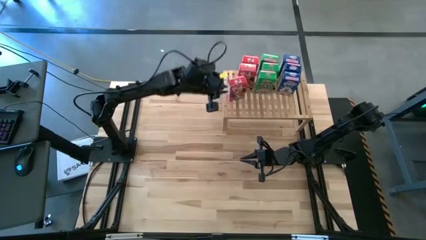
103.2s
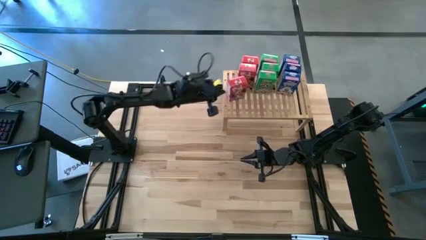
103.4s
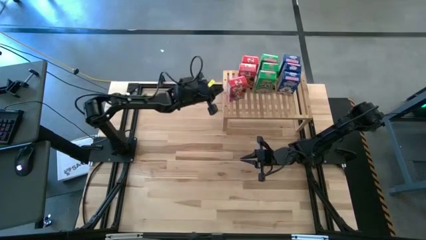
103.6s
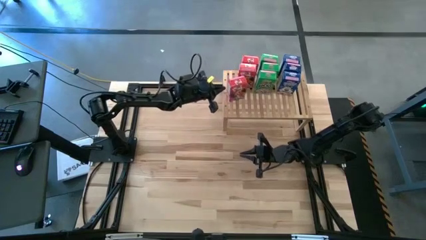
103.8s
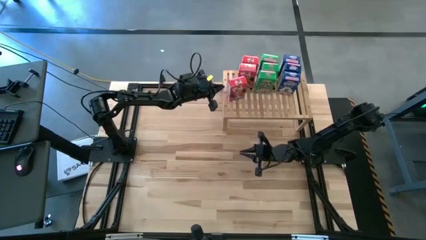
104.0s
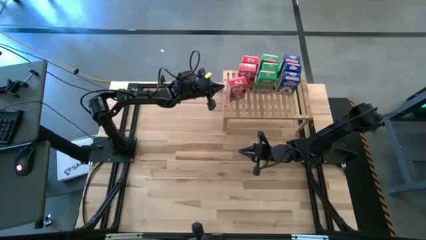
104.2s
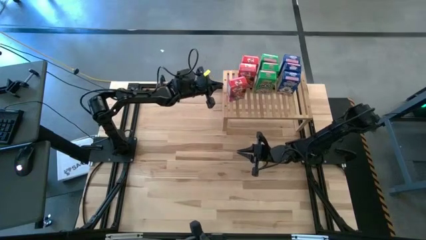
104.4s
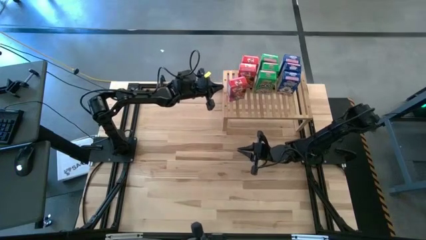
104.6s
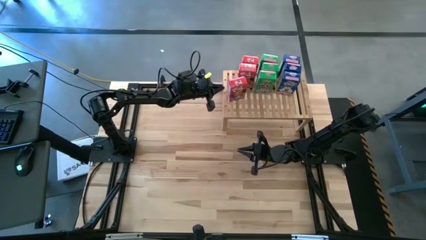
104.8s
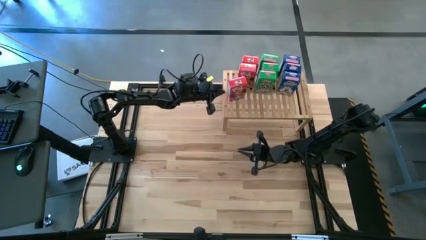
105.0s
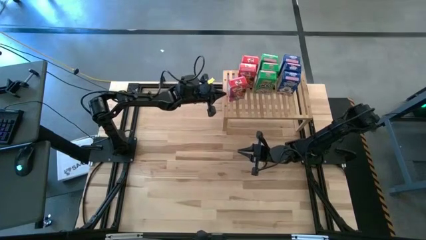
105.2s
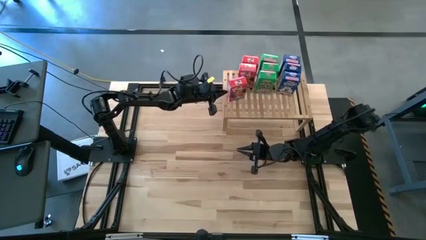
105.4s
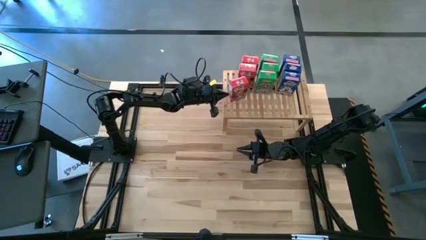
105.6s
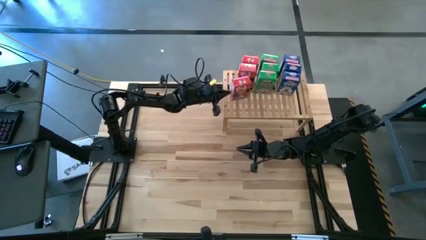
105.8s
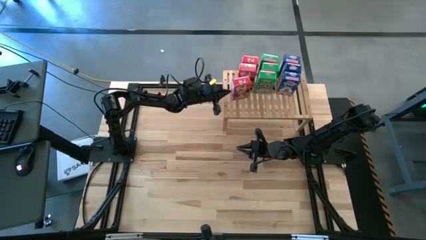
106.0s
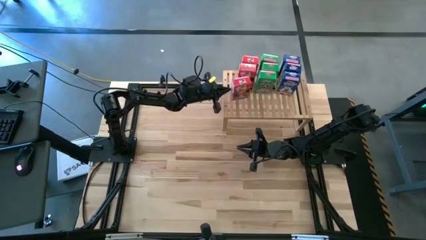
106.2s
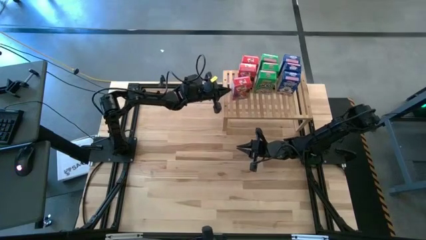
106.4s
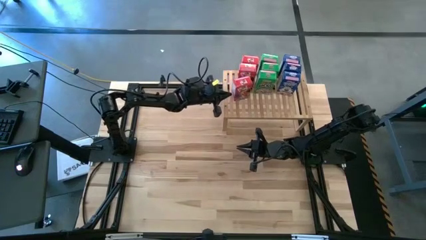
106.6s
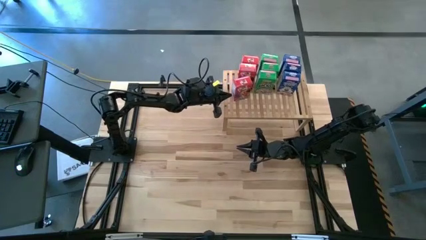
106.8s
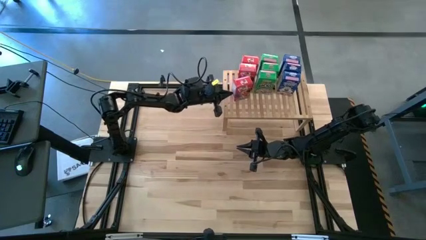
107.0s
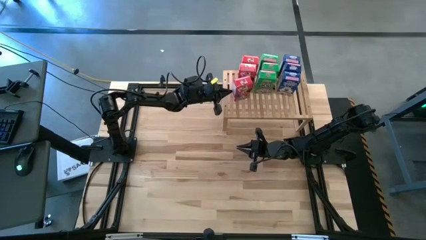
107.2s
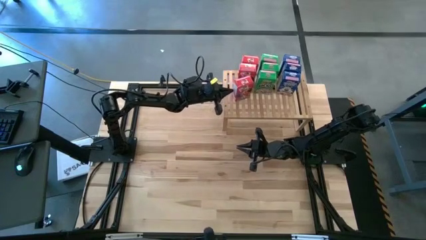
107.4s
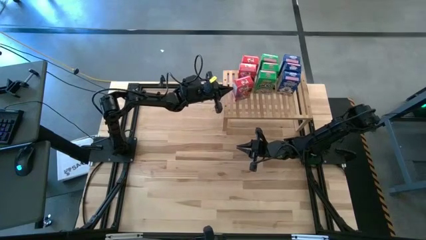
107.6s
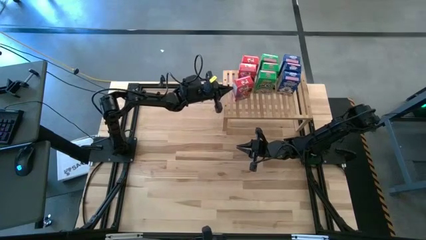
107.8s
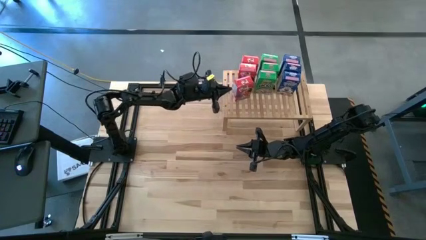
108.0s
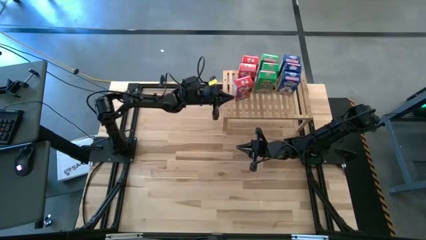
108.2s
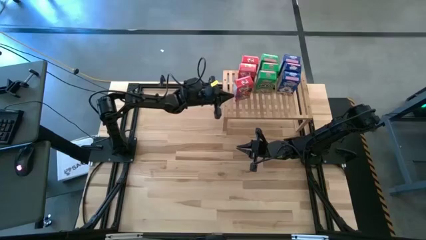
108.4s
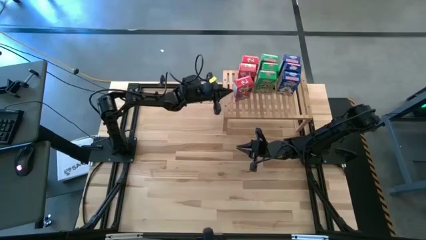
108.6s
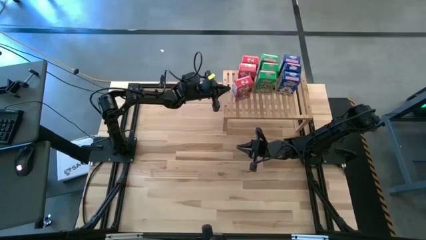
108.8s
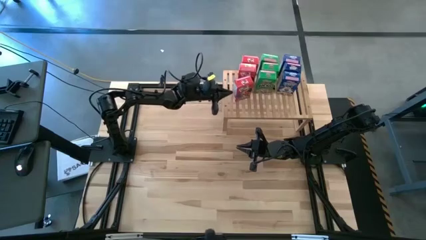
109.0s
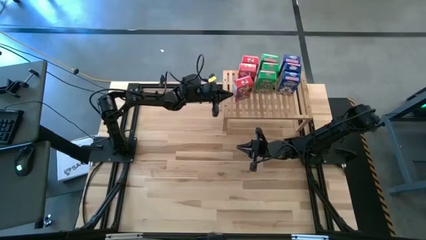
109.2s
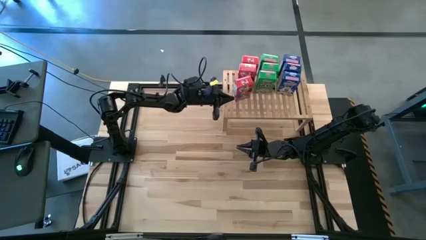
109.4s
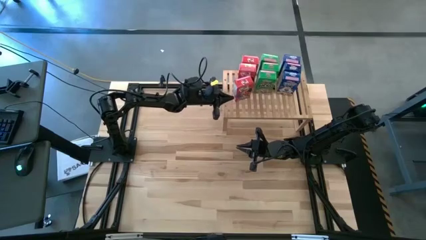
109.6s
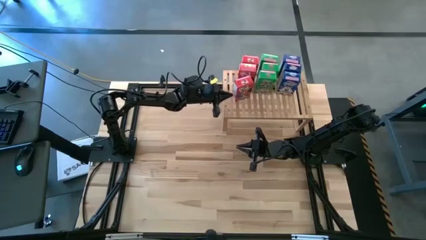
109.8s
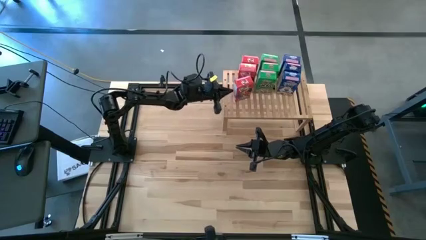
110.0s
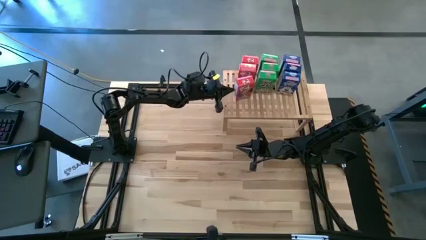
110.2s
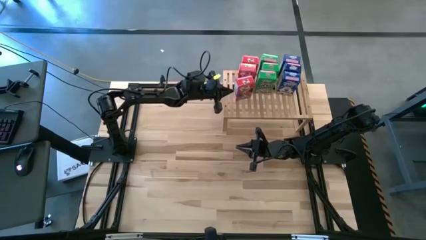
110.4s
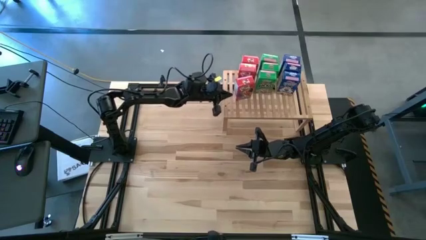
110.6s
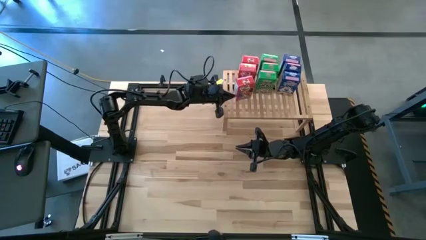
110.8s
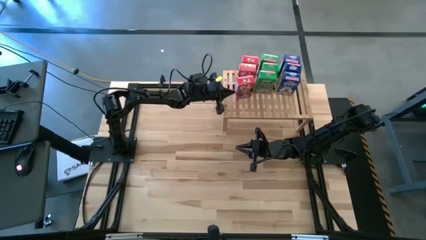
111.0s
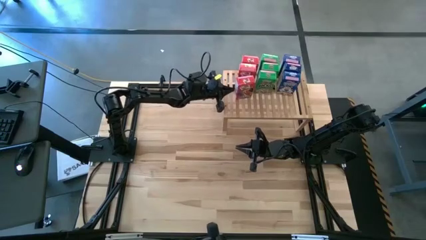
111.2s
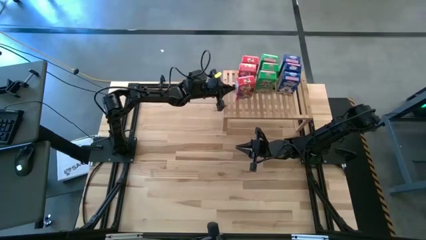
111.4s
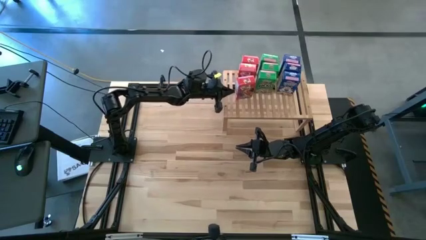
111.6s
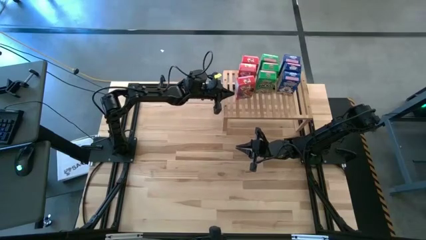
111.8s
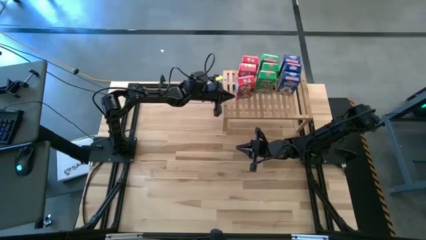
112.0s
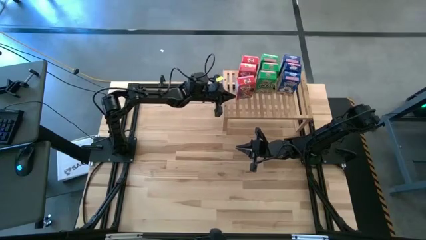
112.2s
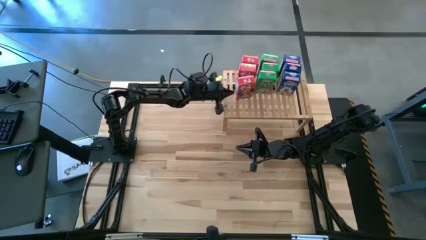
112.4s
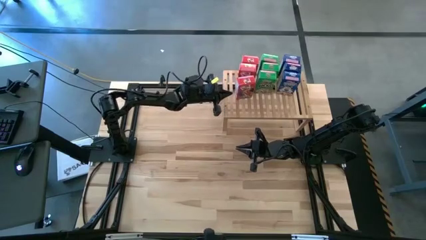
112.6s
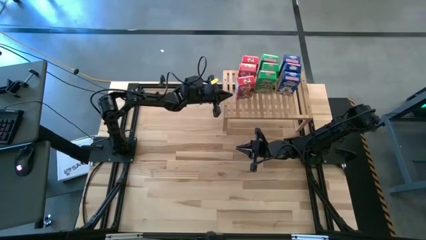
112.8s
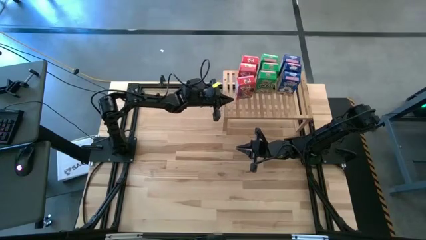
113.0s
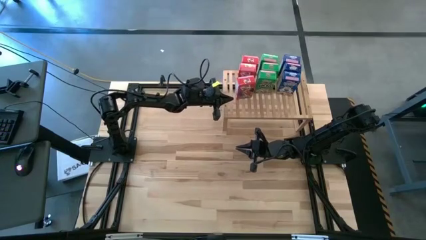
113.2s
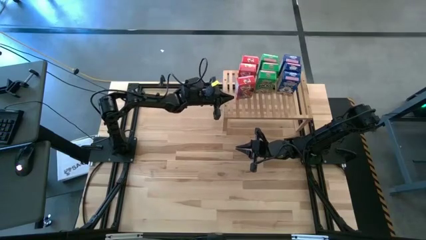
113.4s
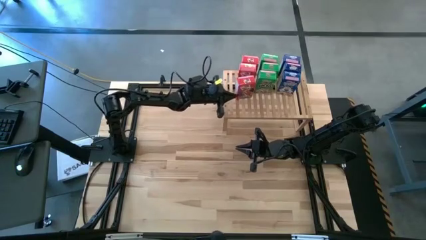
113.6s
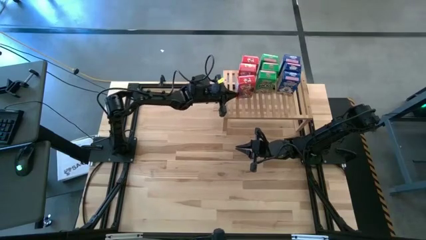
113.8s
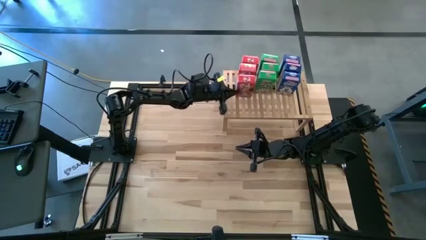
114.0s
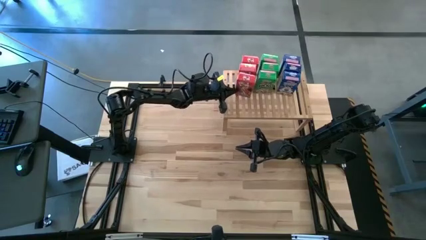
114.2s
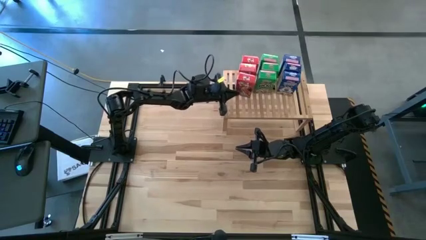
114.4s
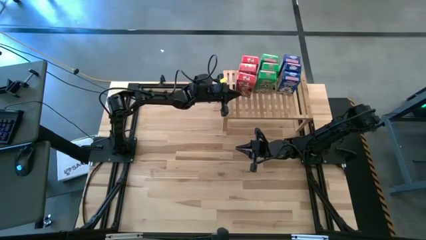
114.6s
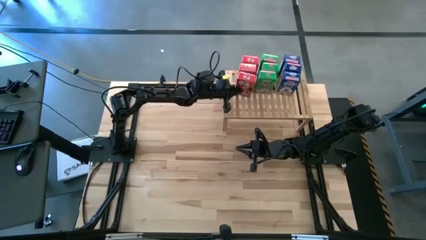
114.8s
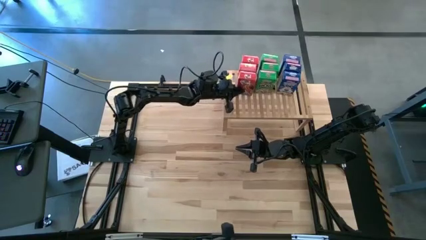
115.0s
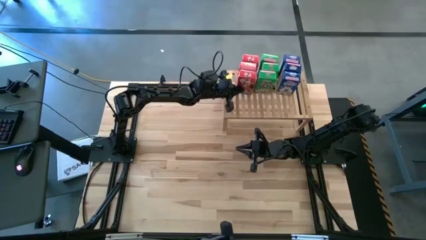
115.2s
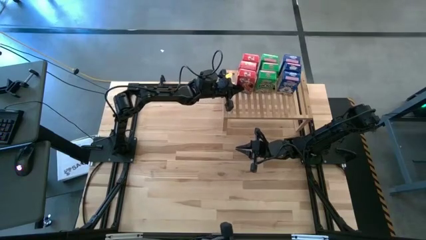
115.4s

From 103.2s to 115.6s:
Task: Stack cereal on shelf
Put the red cereal box on the shelf aligned with other red cereal box

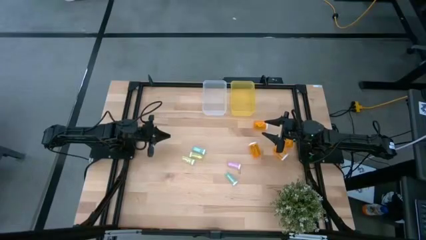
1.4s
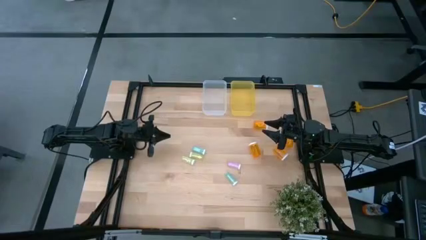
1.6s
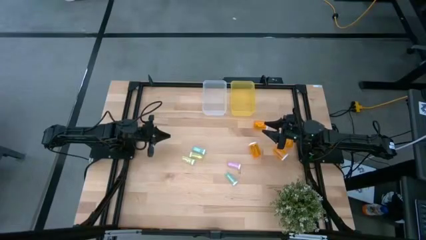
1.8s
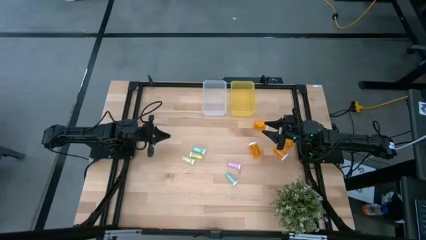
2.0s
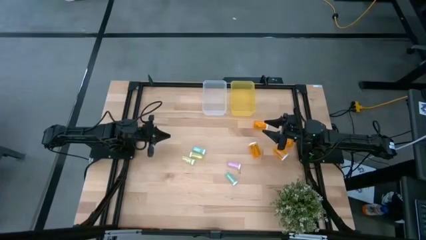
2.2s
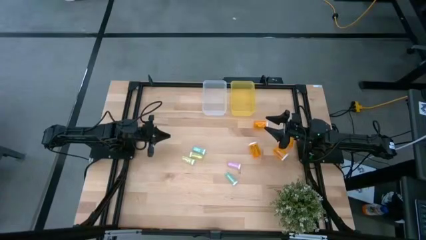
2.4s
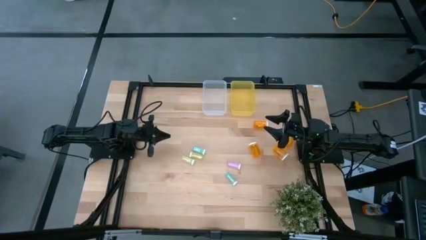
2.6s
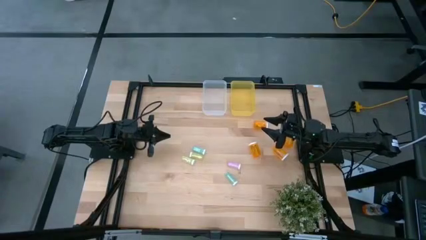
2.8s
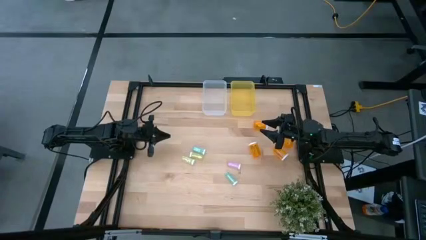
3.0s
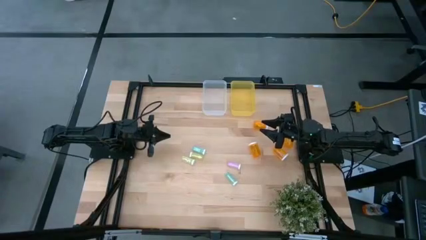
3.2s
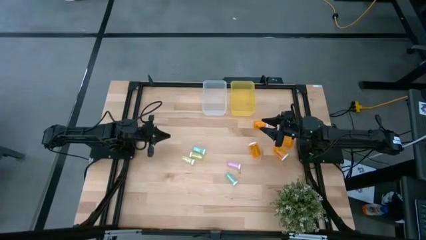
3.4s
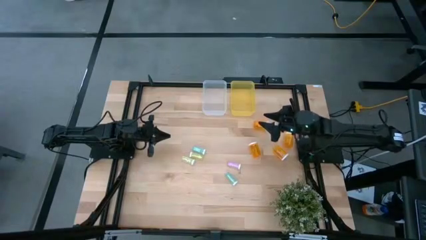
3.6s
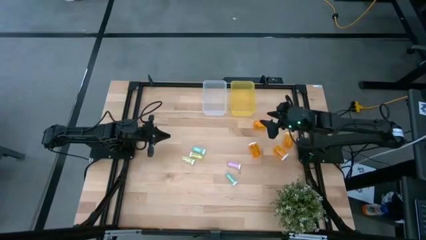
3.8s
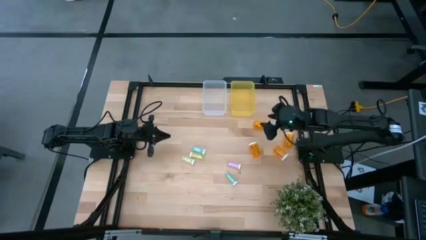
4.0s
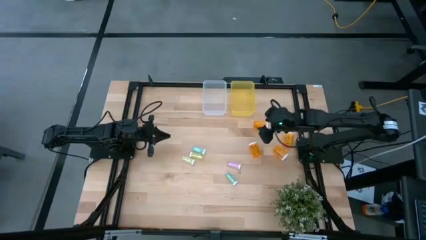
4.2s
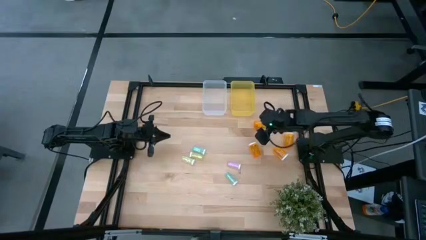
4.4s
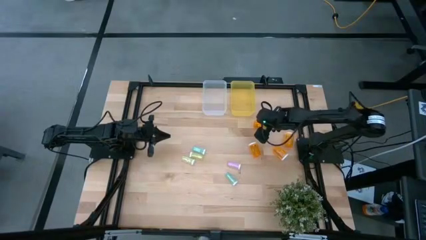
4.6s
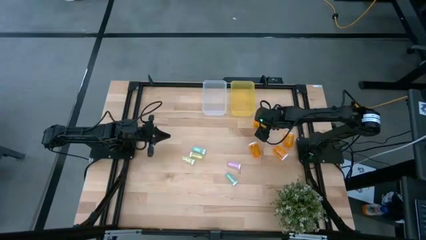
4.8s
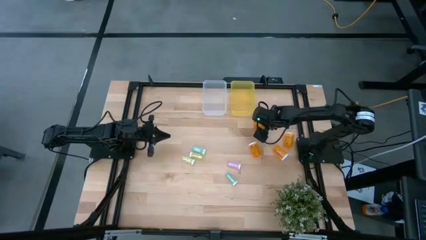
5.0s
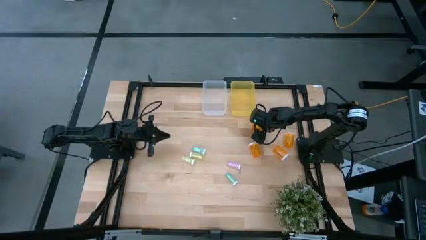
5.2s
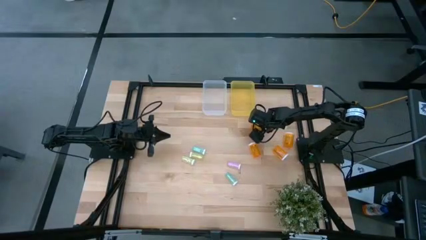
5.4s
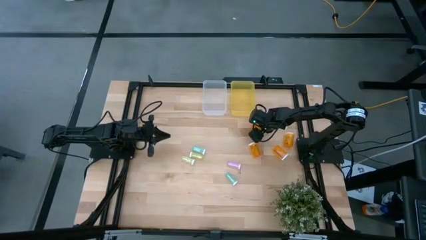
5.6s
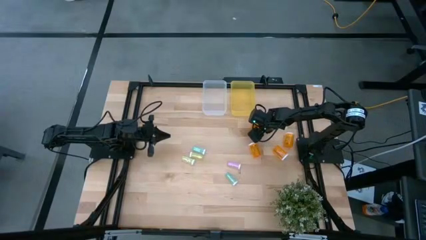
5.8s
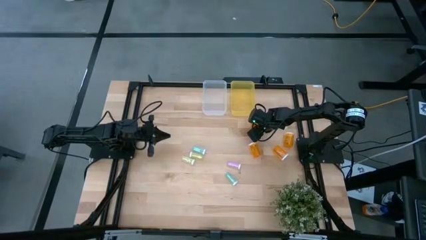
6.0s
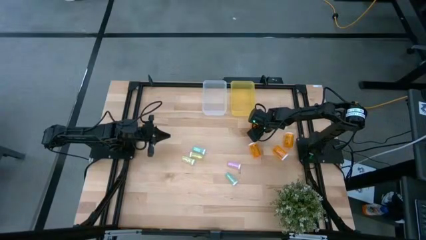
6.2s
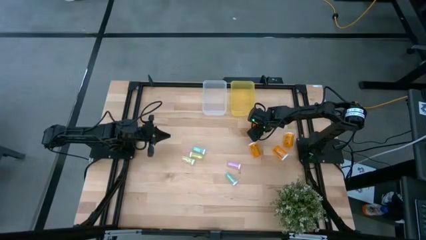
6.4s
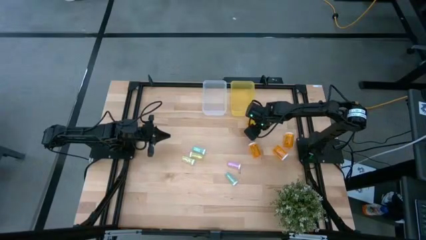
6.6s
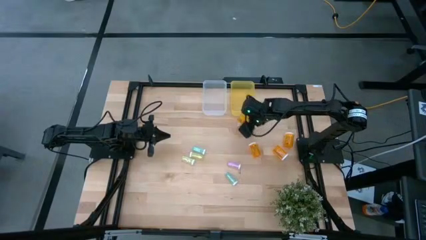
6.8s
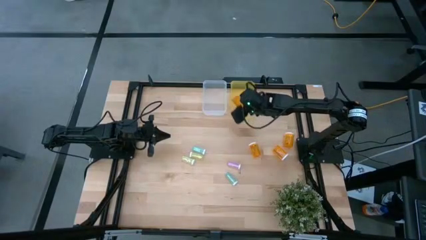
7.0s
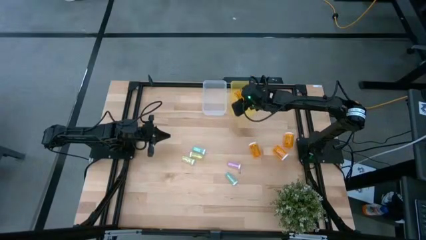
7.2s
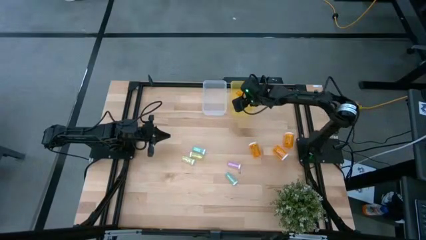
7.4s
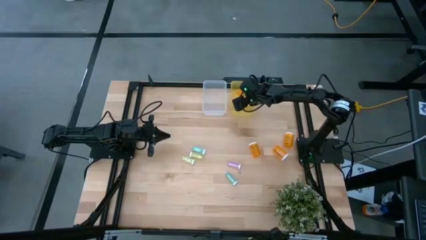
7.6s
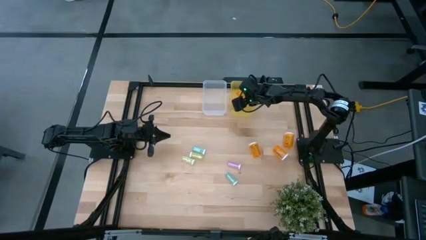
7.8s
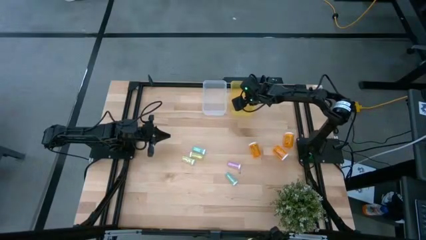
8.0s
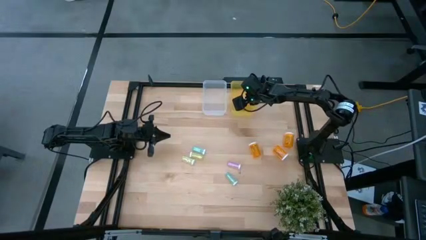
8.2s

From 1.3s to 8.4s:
Task: Pick and place medicine bottles into bin by pill shape (circle, oval)
Put the large orange pill bottle into the yellow bin
